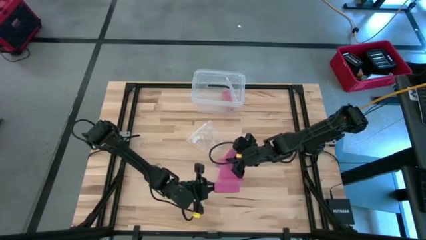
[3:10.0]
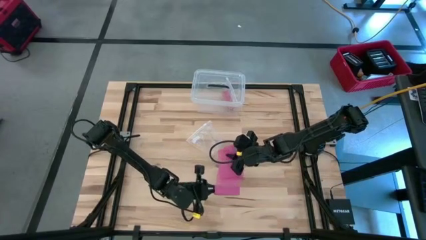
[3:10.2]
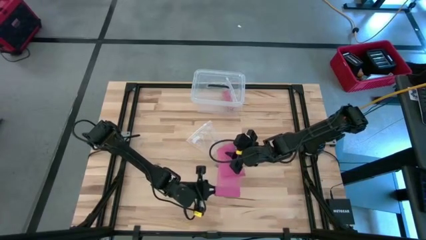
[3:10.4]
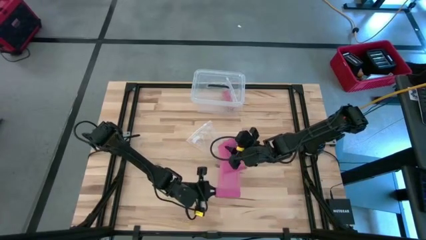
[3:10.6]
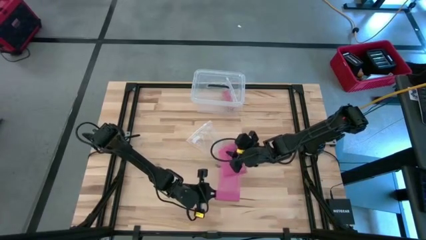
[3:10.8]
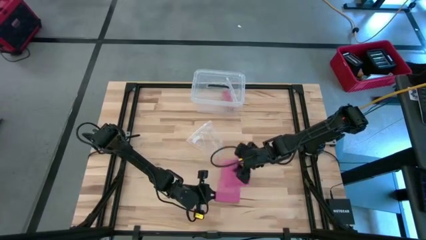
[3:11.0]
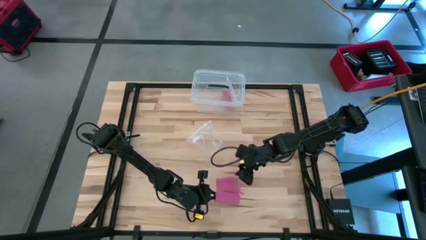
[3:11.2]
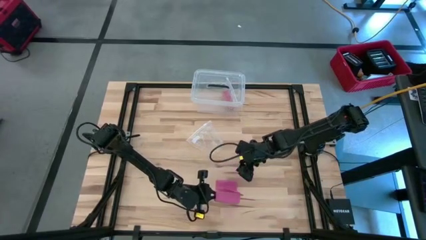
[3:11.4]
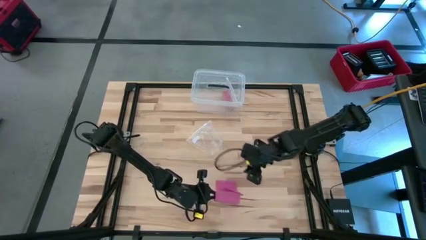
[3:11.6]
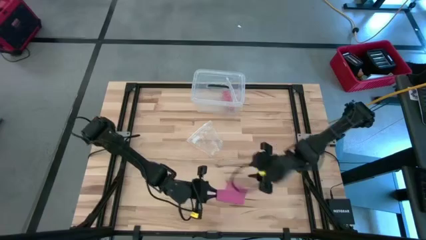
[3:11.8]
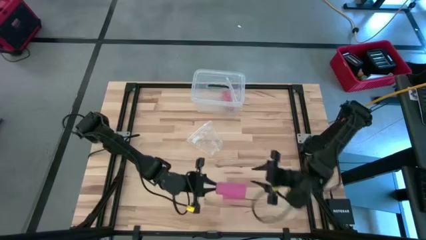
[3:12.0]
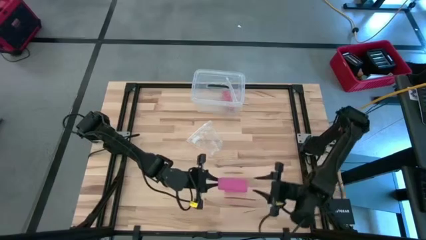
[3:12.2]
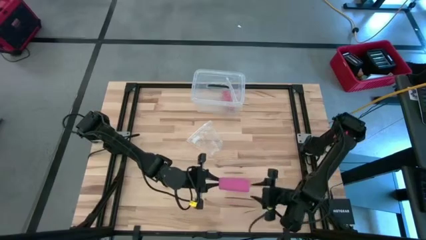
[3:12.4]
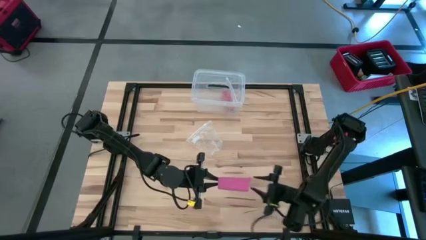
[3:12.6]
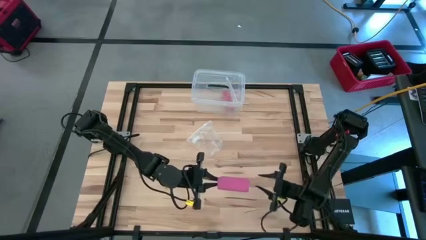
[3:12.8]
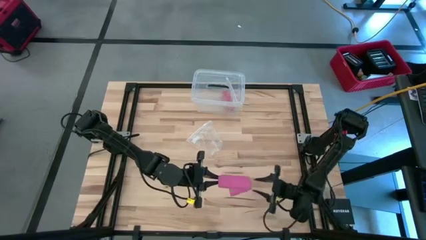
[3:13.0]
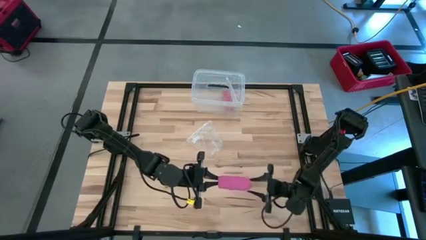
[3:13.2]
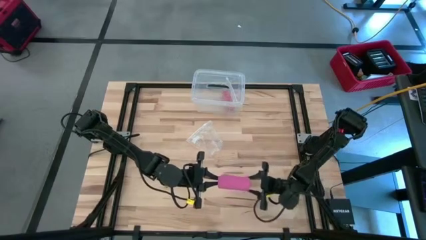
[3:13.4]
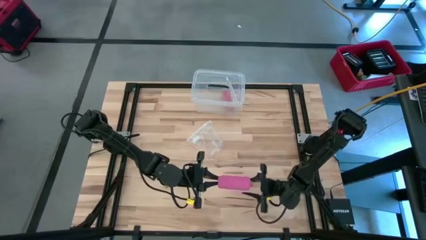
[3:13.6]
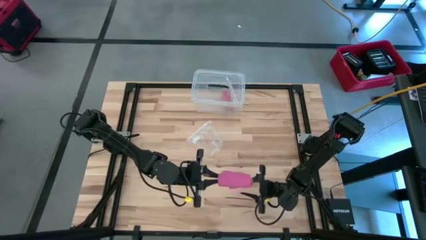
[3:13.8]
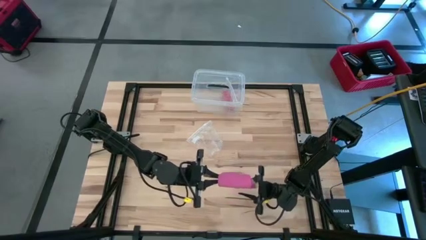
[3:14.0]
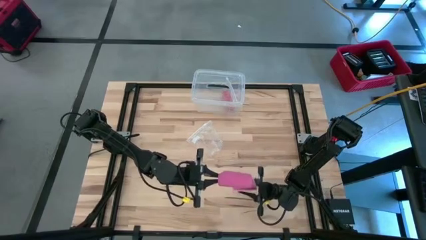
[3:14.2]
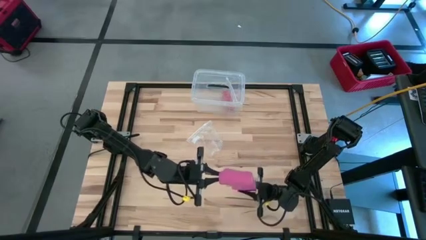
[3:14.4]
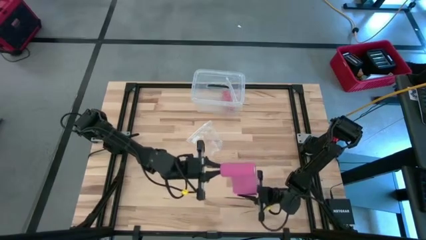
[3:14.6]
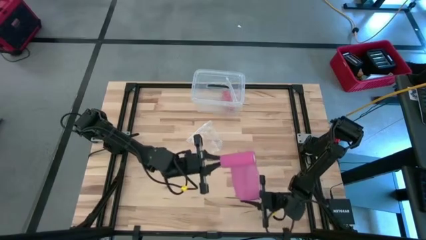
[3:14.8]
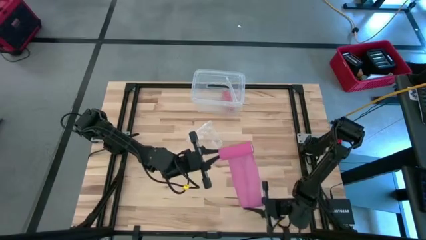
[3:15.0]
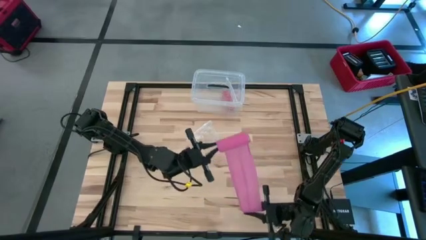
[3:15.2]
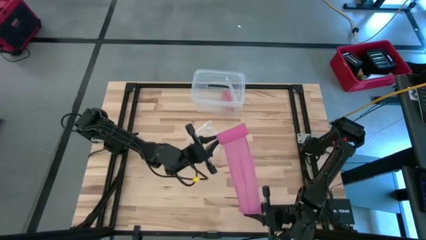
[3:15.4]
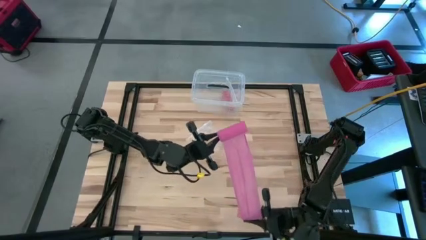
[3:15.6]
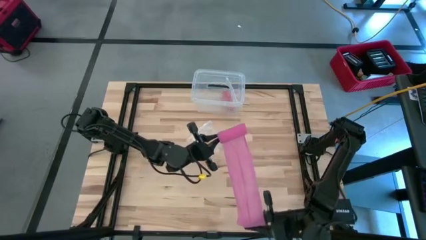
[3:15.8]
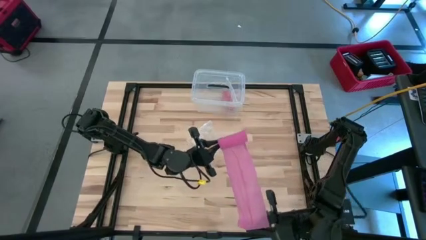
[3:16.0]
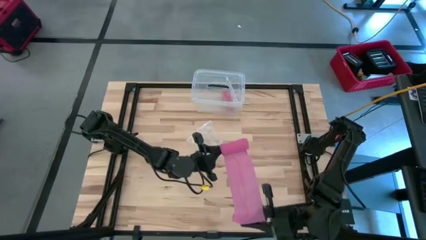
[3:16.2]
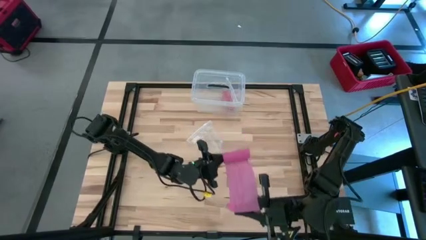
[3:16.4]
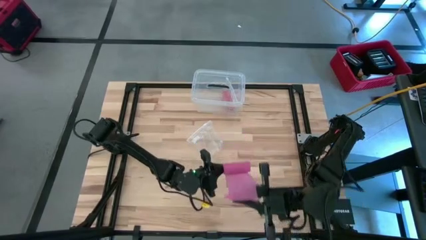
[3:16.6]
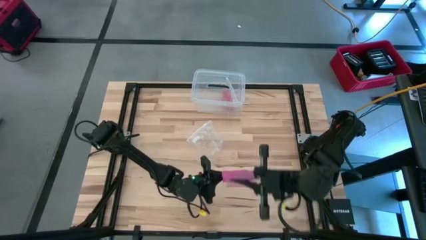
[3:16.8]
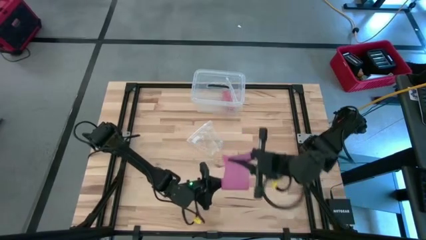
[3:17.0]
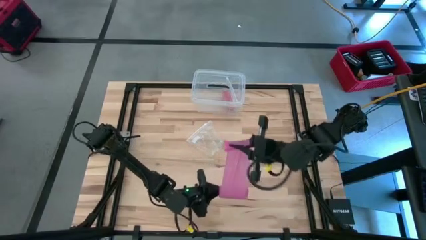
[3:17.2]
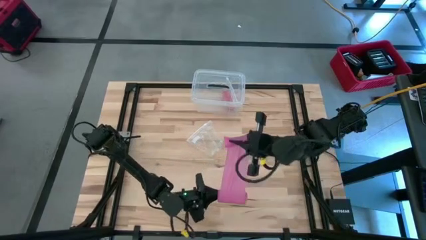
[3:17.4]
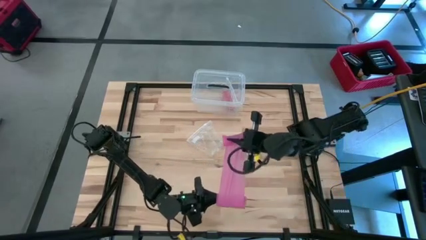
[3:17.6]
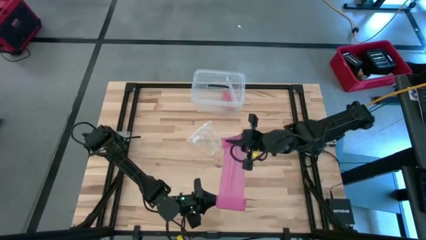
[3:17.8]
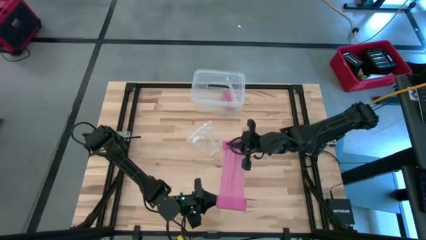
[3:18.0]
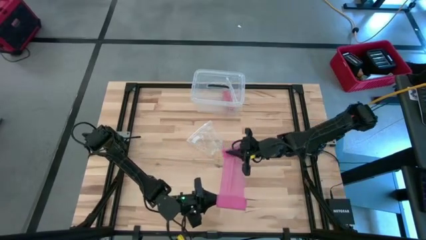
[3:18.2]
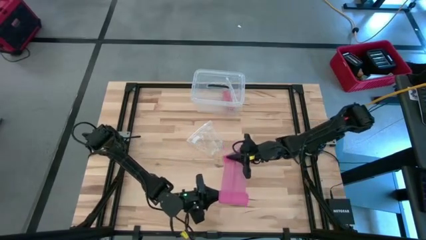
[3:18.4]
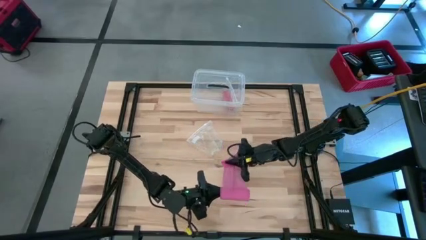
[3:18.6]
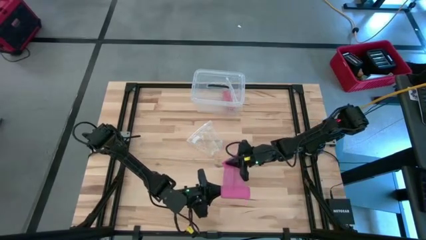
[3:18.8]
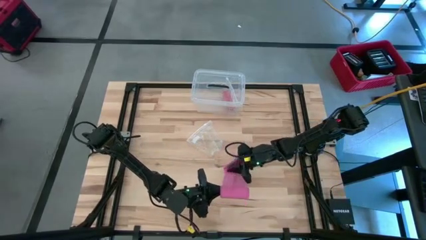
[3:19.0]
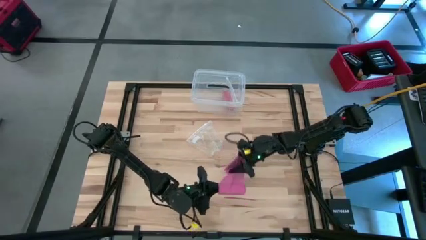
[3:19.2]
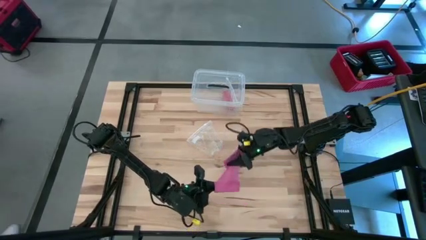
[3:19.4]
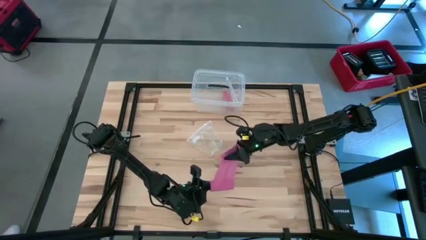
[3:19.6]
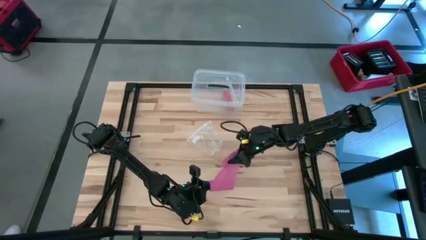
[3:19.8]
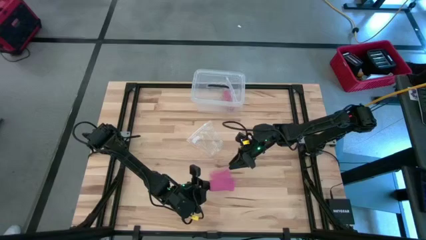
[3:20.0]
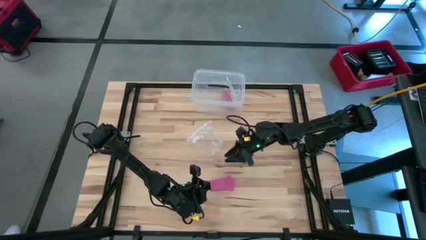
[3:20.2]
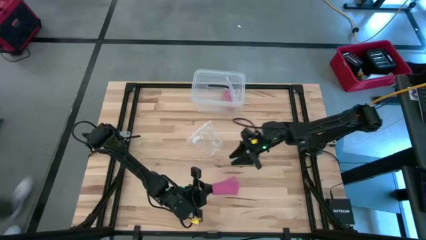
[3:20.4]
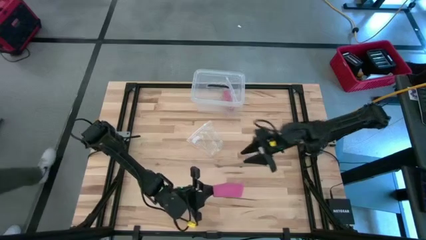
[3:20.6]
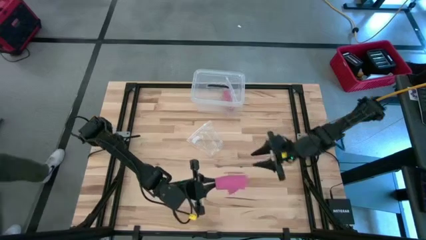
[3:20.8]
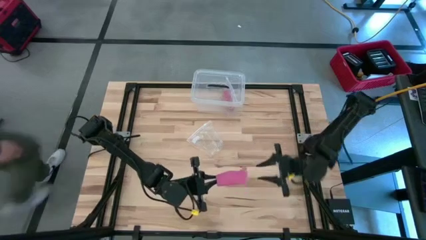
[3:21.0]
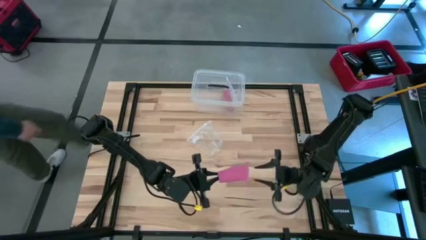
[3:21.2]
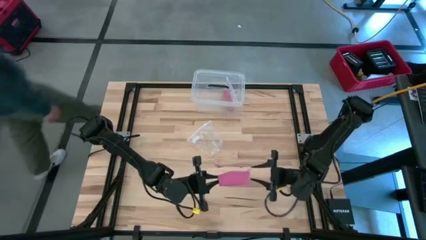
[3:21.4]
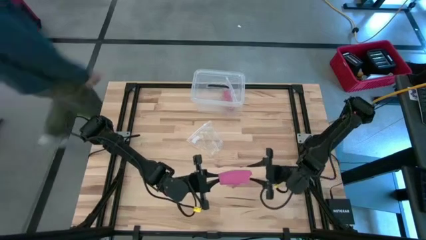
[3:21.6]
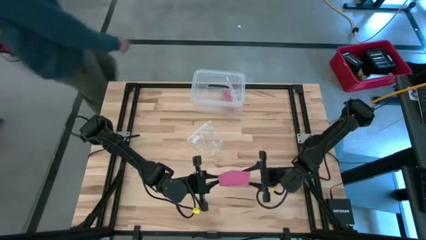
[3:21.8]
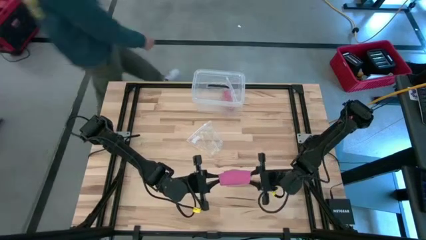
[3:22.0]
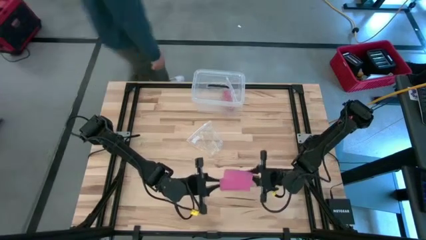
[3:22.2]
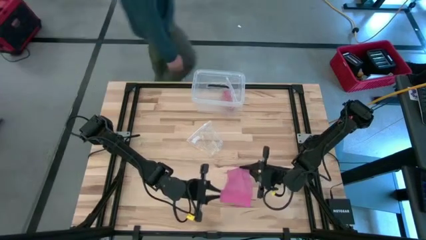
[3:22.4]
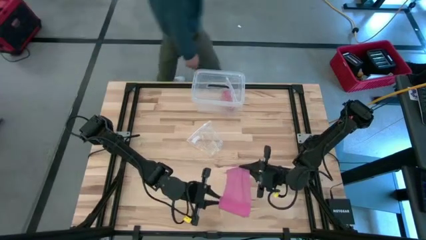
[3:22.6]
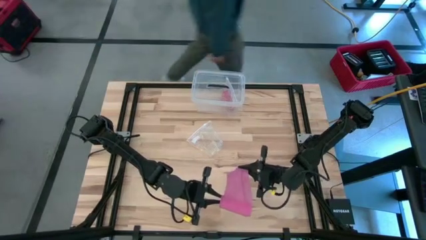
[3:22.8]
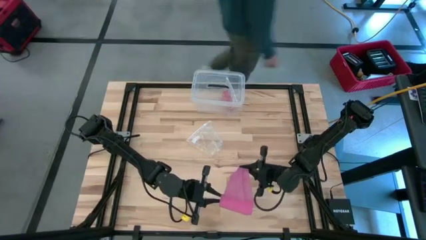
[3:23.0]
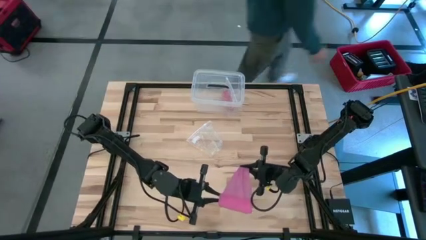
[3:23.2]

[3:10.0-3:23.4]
Task: Roll bandage
Roll the pink bandage

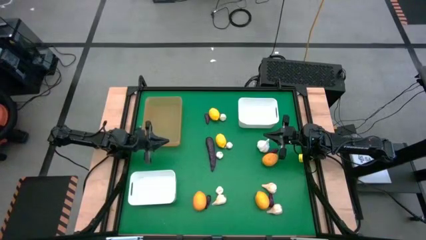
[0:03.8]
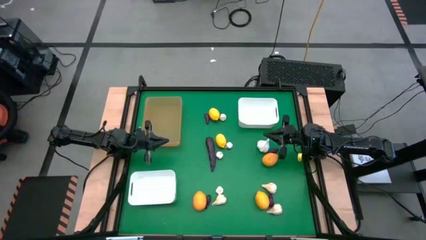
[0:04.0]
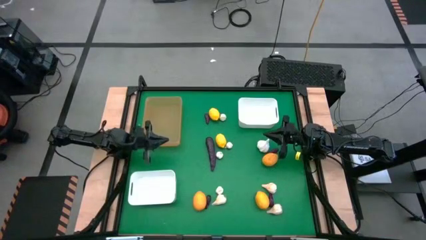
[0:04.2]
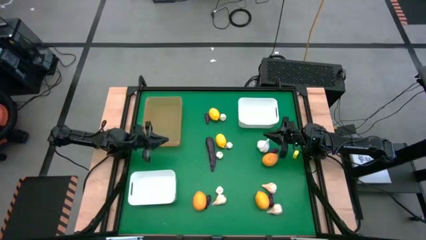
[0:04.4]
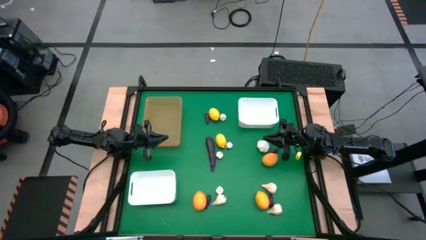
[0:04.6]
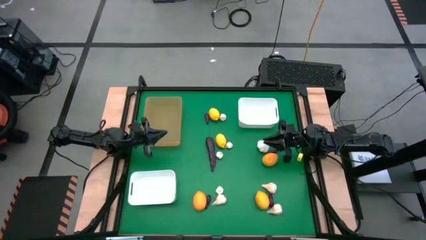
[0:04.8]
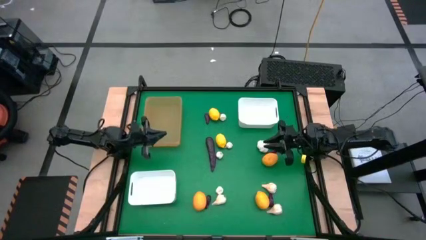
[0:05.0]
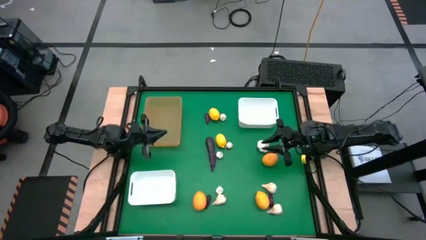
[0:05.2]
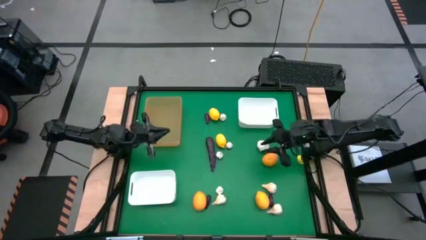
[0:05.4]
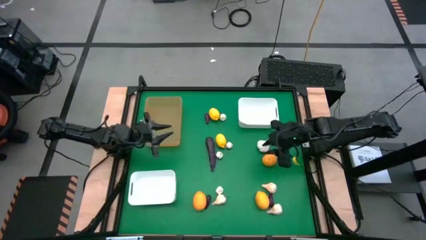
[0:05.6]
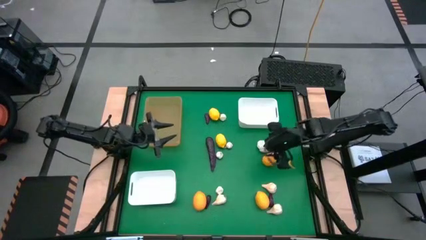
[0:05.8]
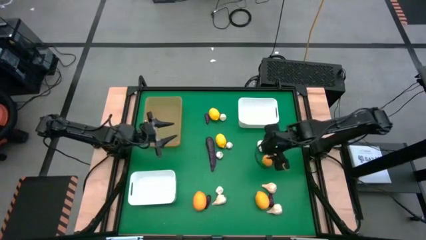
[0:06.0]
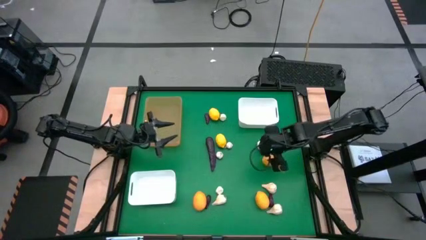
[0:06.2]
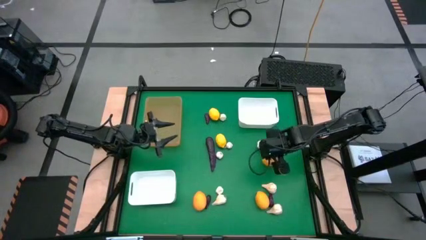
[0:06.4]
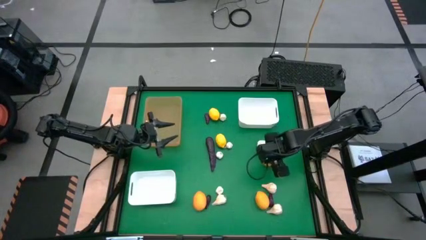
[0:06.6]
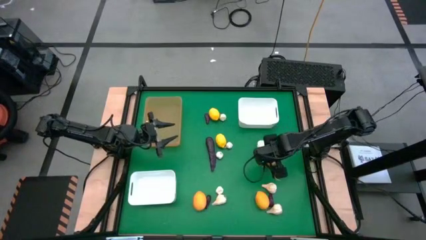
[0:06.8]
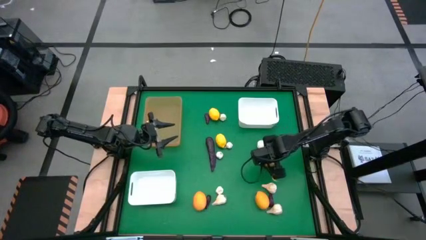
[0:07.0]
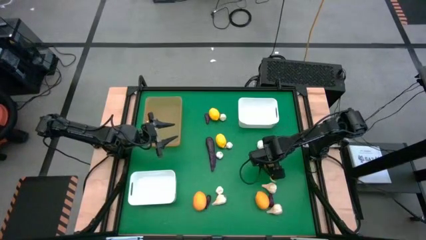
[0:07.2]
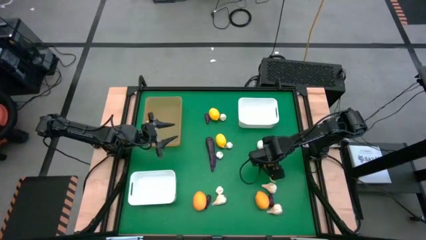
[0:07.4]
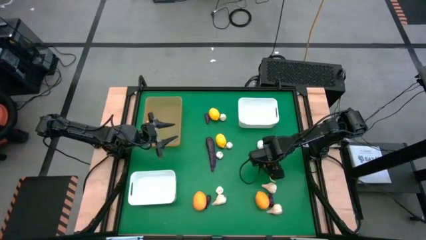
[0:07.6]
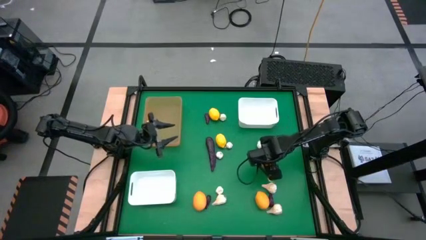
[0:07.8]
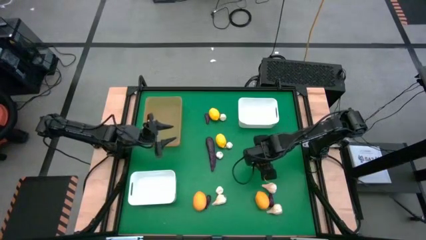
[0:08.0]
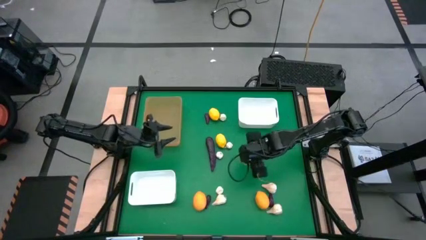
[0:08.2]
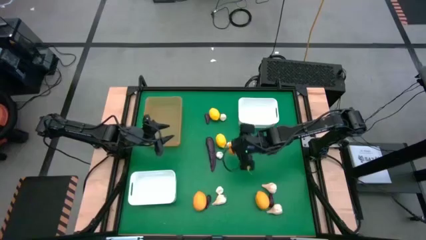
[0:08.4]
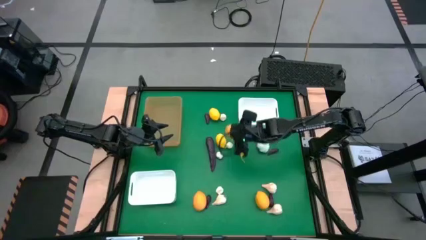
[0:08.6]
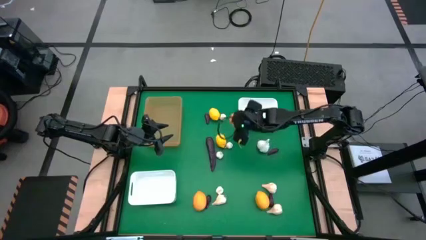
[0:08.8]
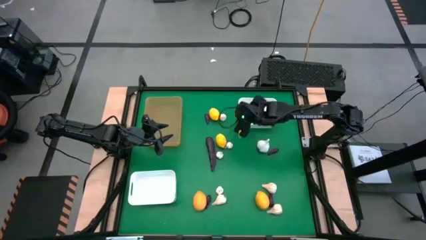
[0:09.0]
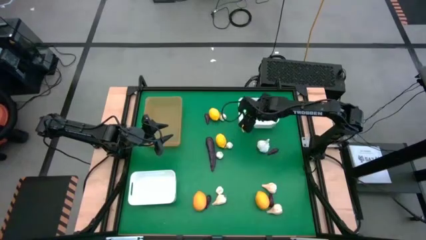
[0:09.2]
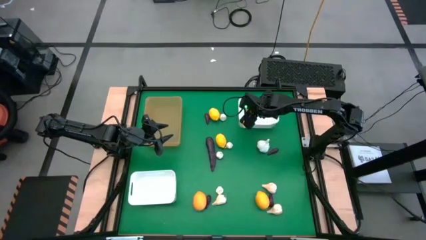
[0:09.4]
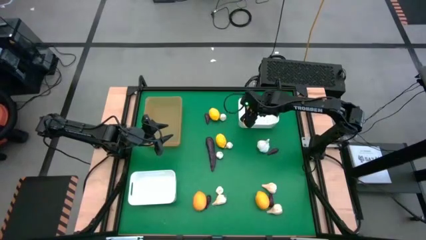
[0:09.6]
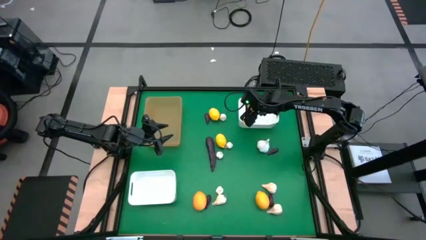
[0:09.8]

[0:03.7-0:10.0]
Task: Sort produce into baskets
Put the lemon into the top white bin
